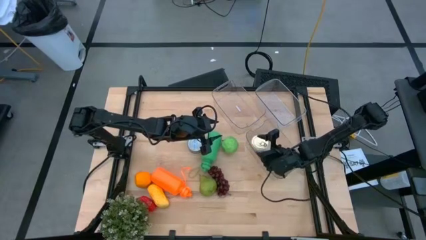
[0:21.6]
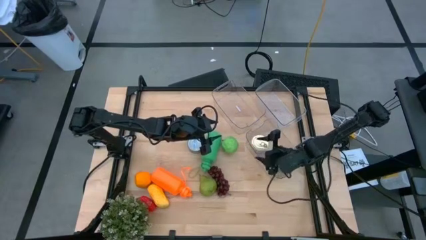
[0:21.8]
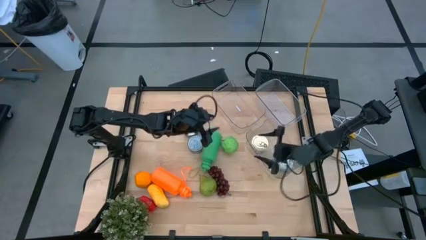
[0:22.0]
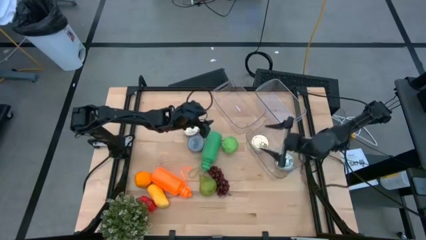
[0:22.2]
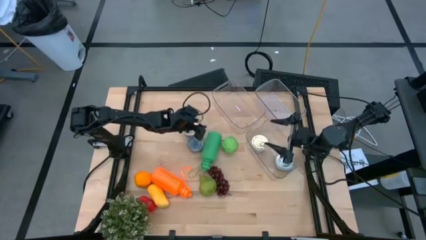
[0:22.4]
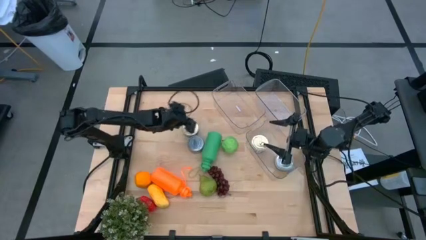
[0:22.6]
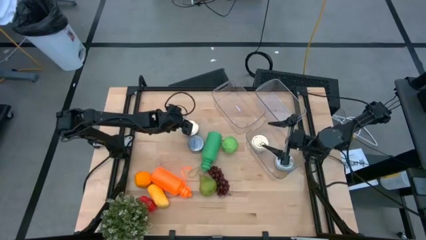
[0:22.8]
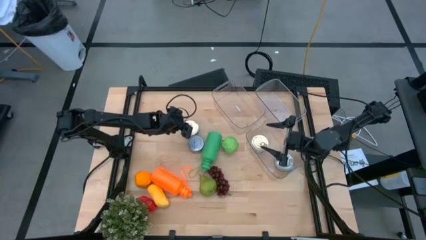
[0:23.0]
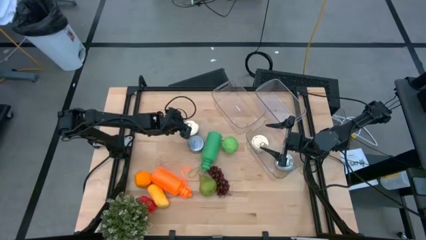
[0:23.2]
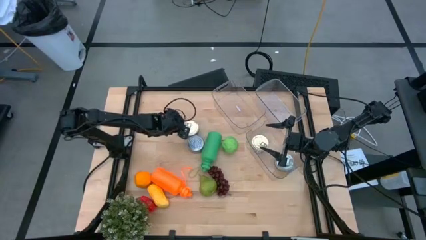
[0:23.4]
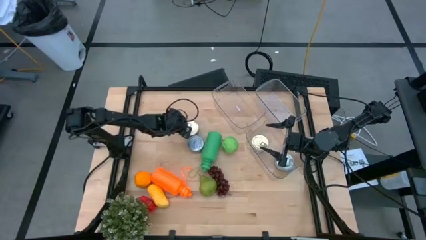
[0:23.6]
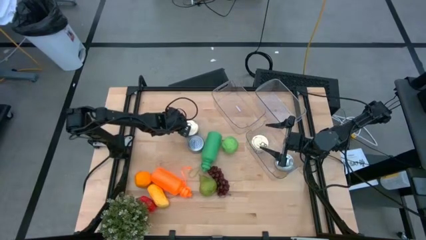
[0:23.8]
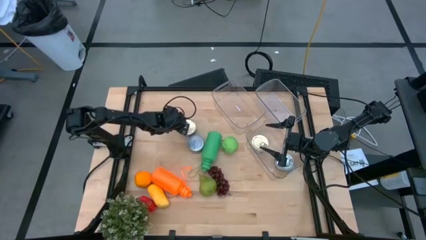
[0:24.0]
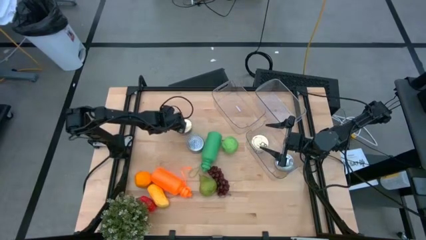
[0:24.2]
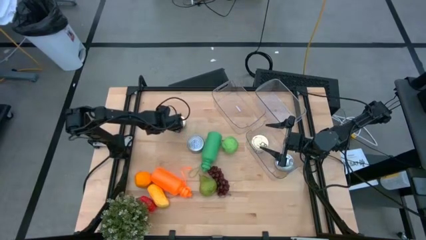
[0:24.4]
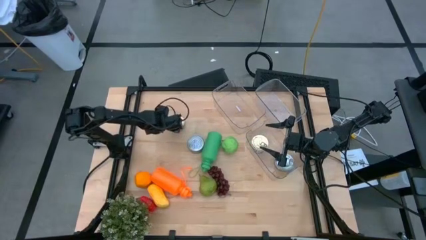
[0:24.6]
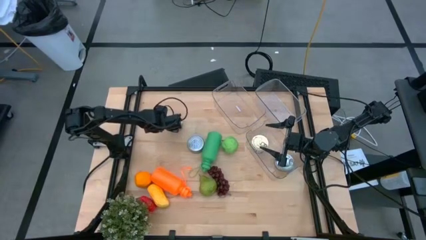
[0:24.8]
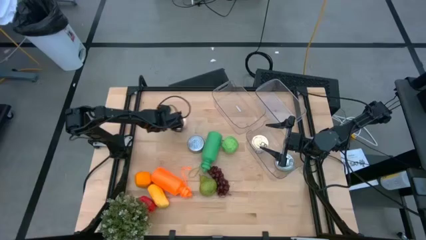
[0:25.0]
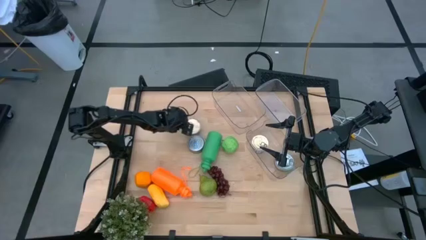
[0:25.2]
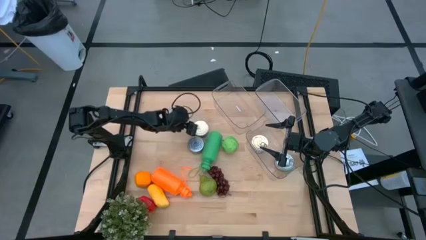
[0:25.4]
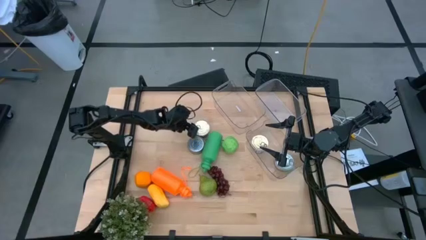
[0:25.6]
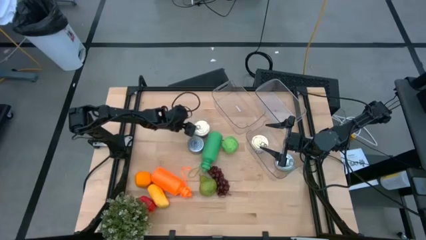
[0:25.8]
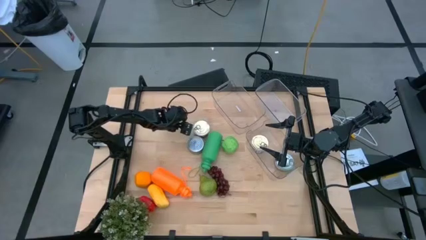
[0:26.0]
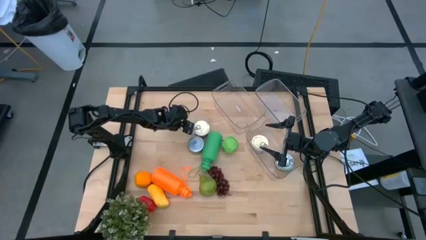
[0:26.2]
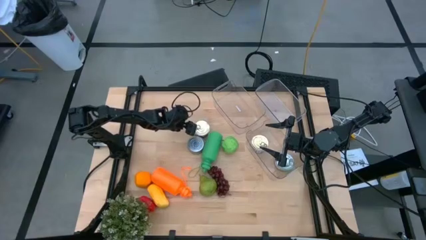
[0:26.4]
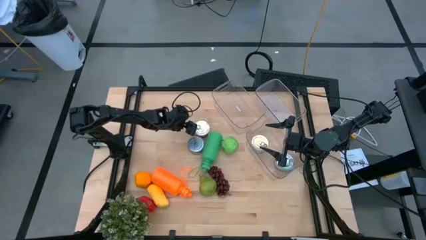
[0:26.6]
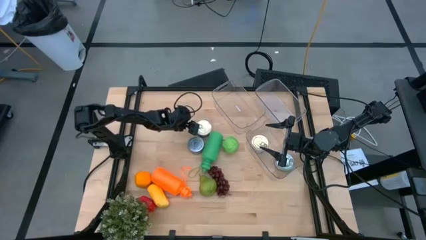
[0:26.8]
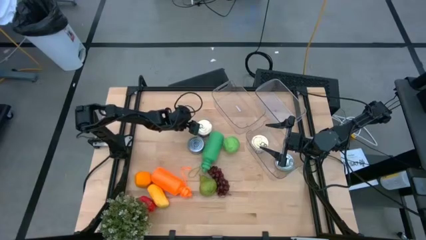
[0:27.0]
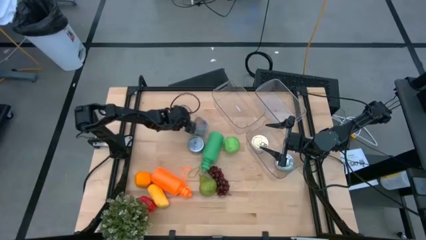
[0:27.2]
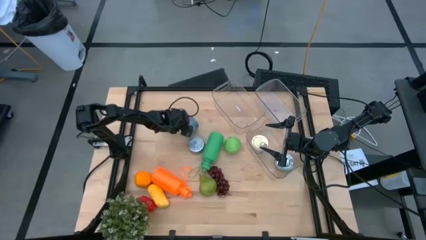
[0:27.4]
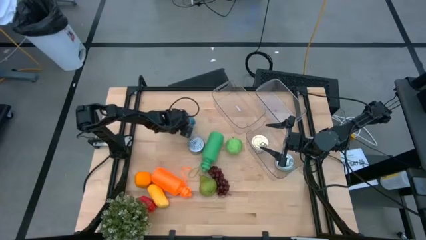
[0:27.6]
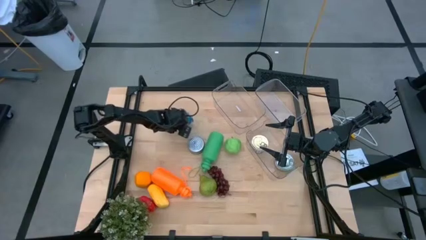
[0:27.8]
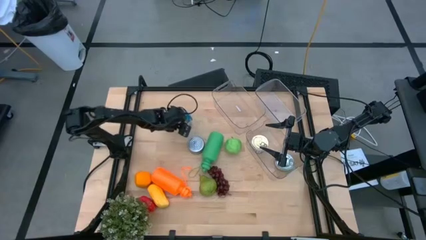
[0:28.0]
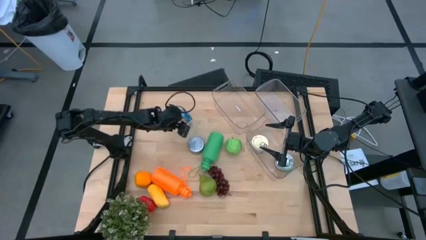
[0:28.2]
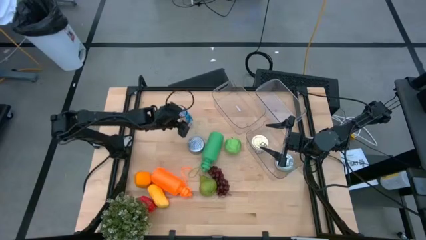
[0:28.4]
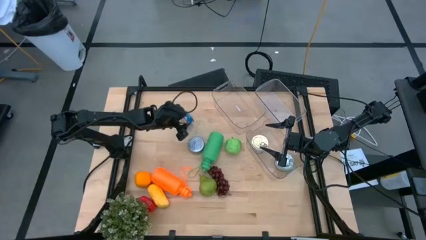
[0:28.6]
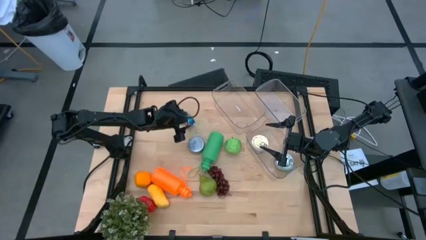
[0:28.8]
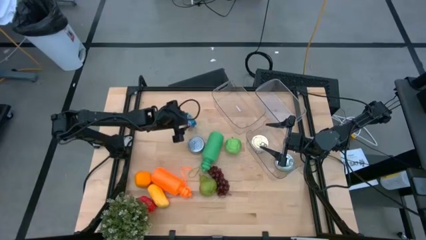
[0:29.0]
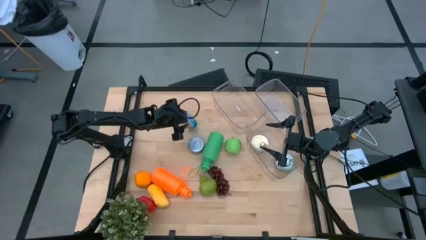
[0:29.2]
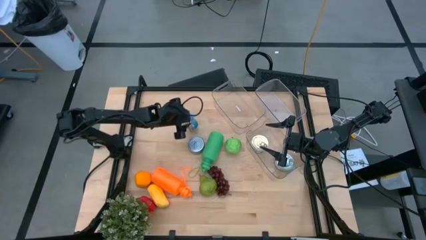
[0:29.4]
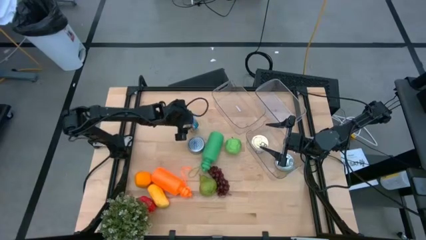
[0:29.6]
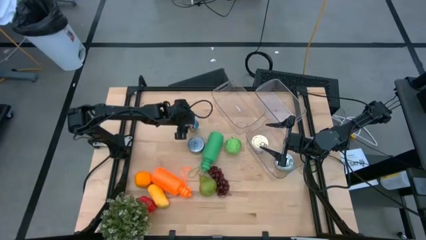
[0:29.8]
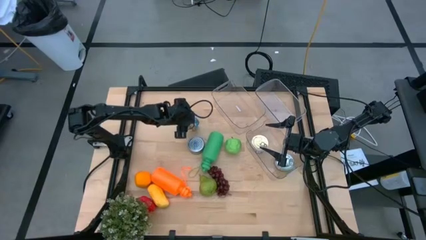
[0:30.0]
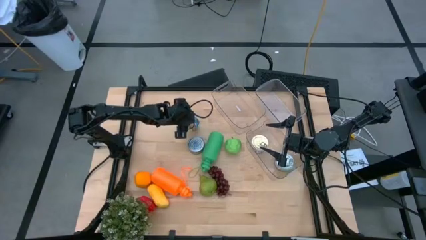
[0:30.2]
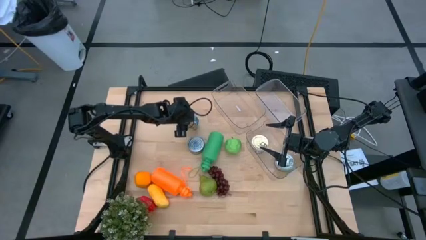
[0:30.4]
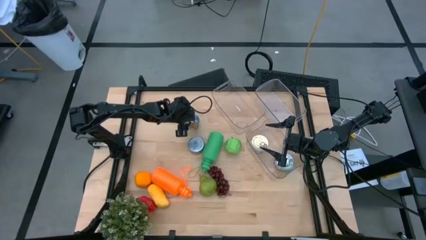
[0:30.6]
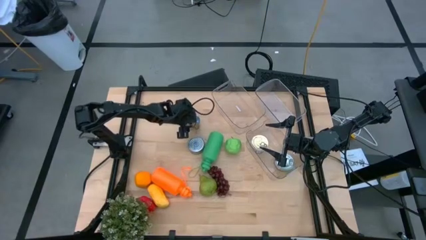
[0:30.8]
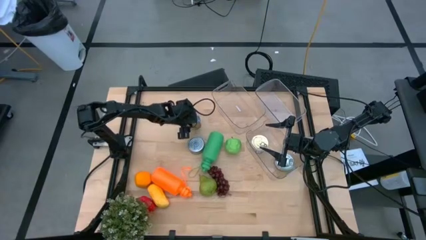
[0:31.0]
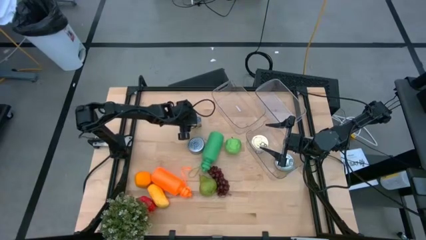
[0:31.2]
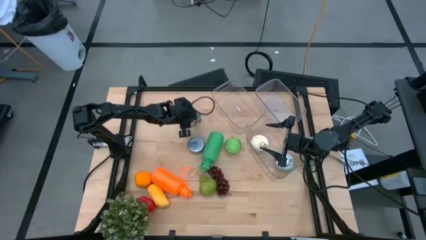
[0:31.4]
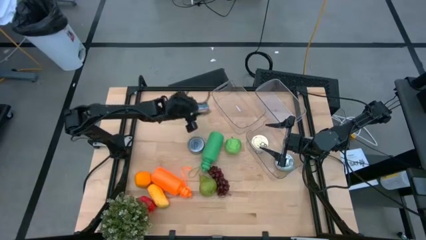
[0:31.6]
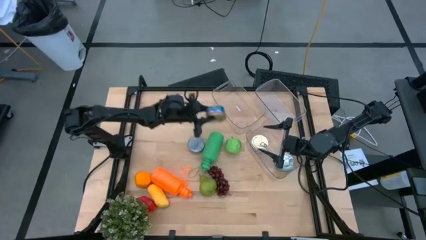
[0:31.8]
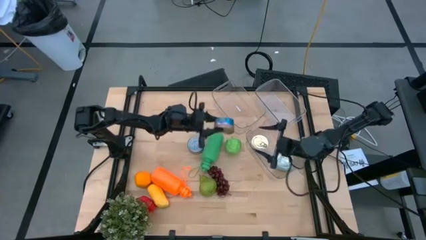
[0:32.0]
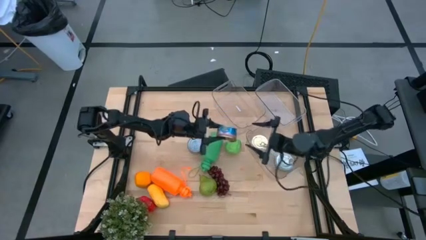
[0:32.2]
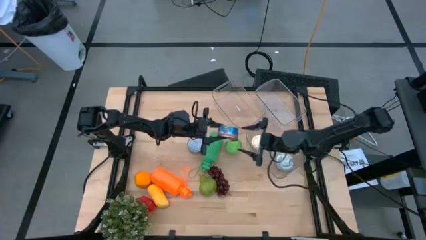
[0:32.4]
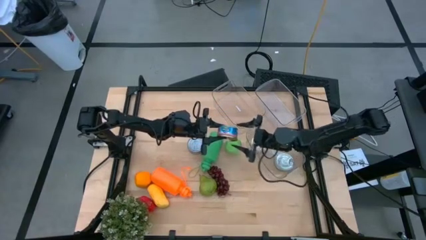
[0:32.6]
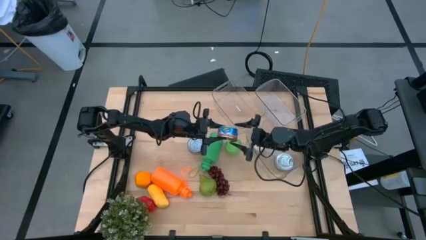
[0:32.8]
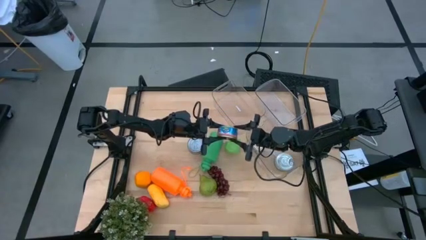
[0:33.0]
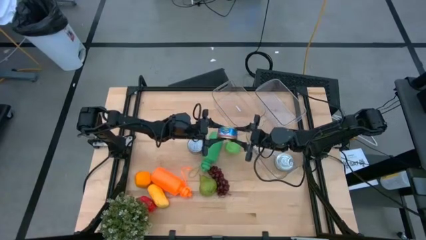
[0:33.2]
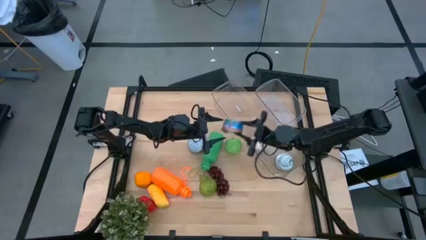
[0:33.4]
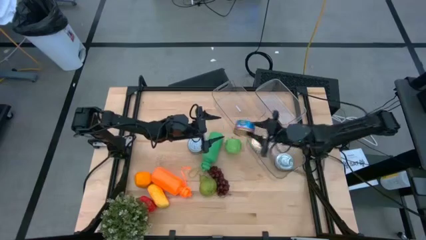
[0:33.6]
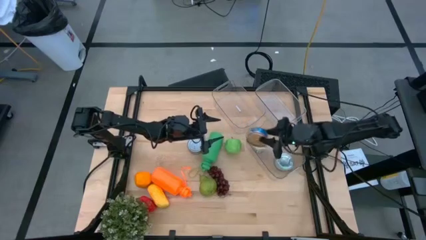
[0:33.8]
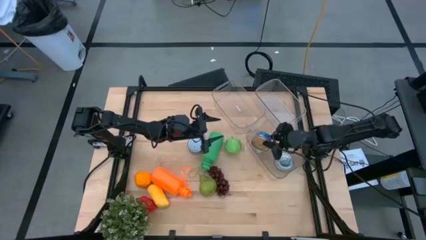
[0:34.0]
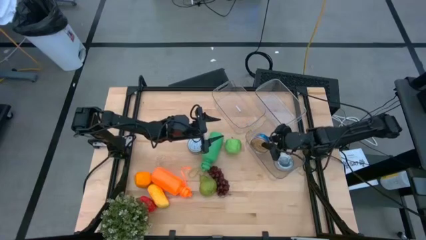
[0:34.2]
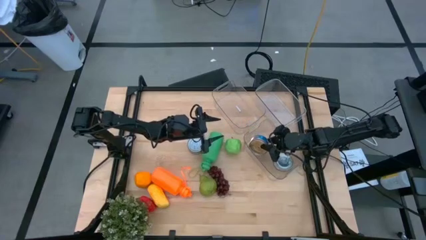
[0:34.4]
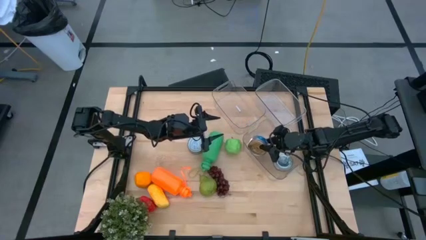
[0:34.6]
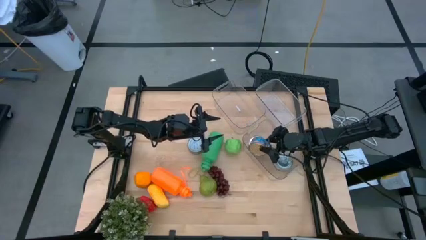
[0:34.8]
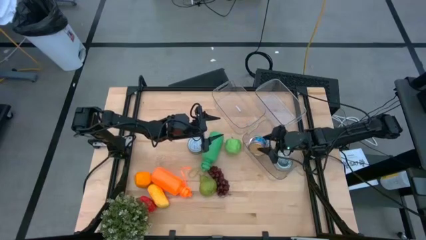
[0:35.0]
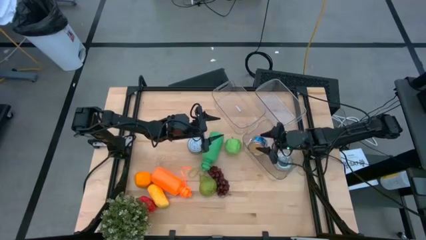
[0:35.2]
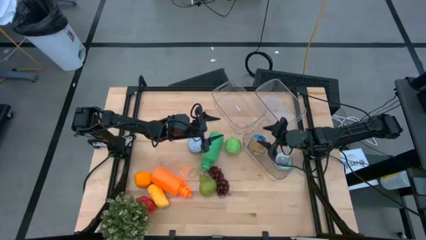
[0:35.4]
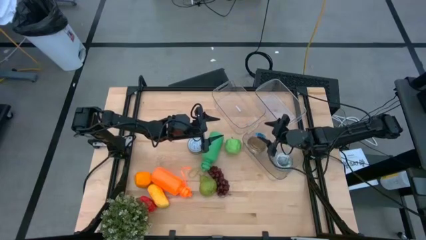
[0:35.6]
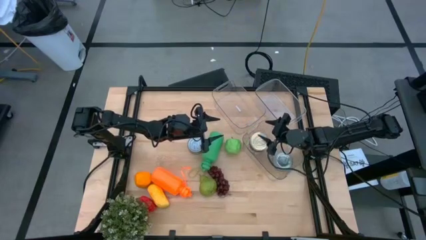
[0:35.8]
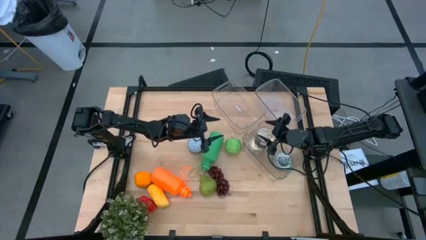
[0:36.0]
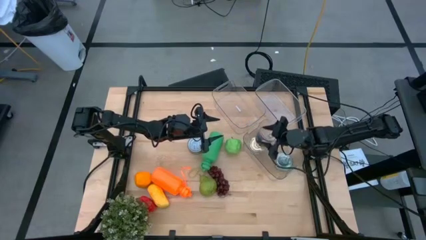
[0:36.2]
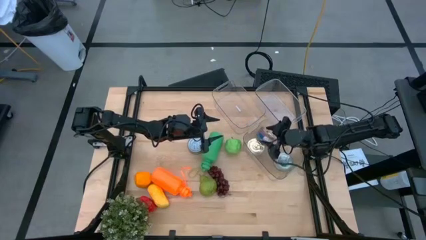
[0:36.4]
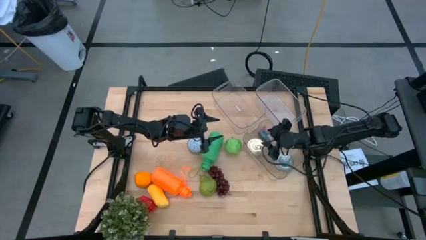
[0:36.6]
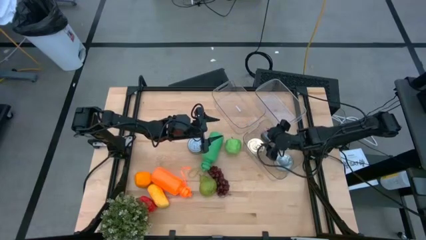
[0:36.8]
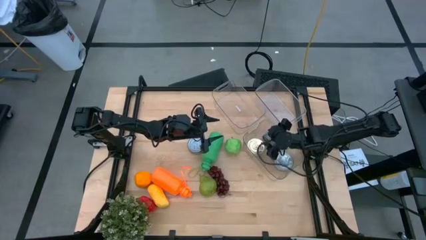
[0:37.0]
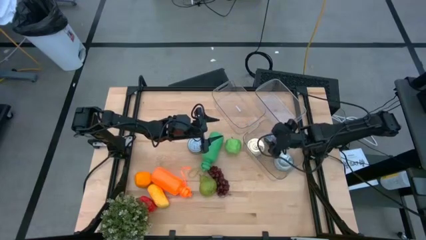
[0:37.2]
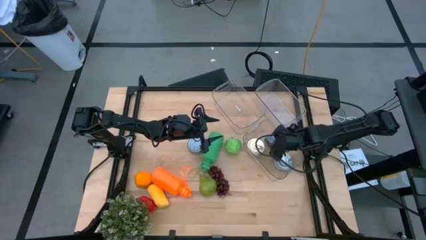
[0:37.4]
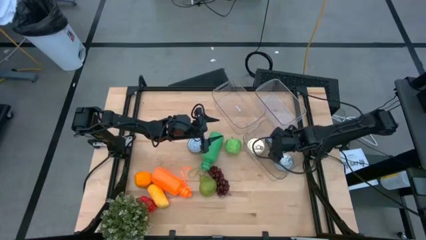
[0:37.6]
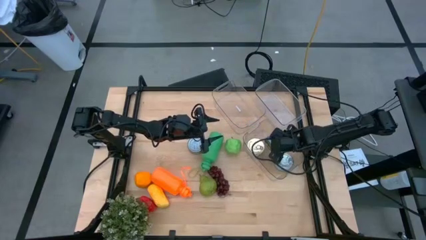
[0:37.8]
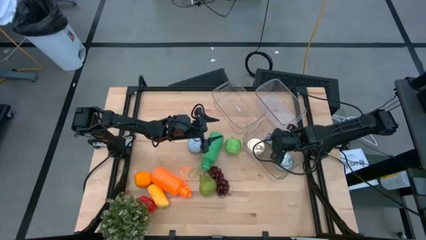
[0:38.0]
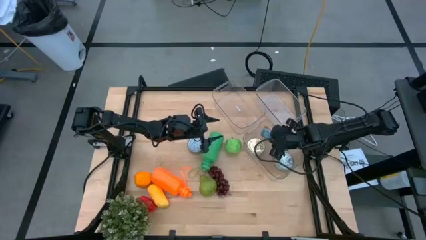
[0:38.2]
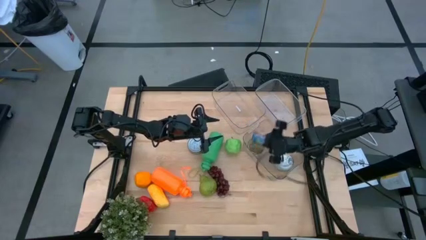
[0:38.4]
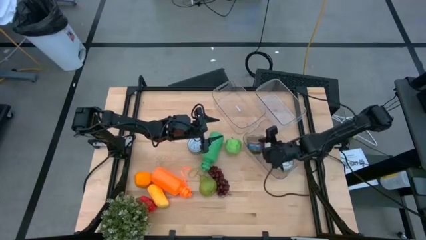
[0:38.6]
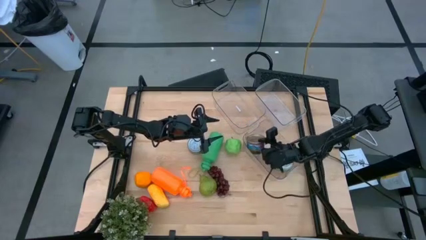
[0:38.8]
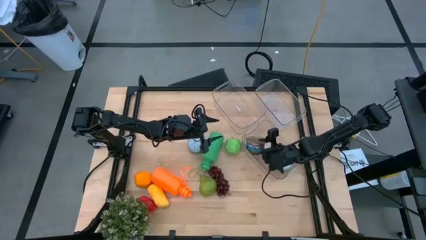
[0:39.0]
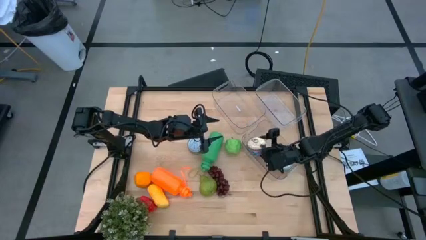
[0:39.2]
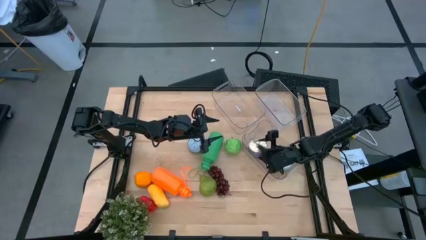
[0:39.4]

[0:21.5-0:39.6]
Task: Pick & Place Food Item
Put the blue tuna can into the bottom transparent bin
